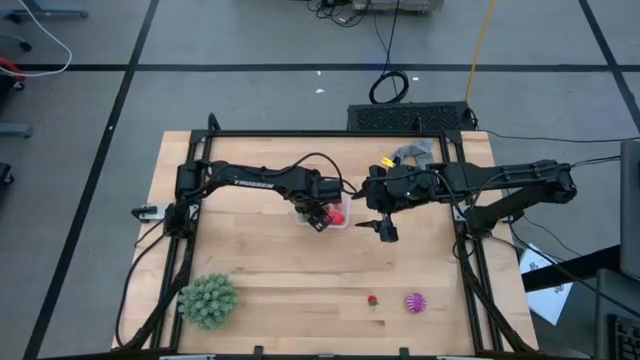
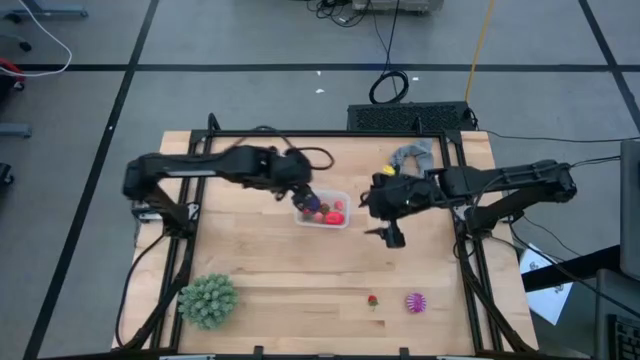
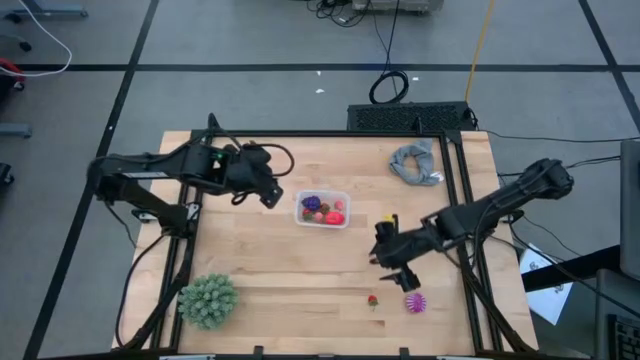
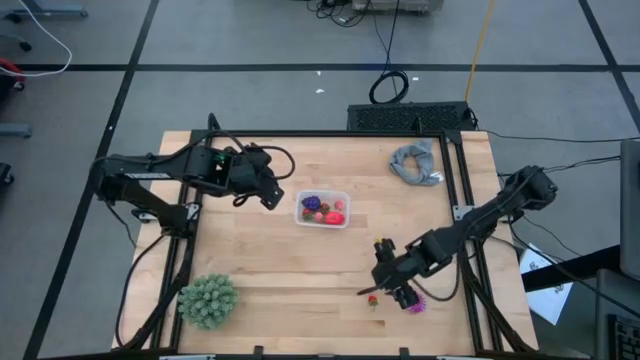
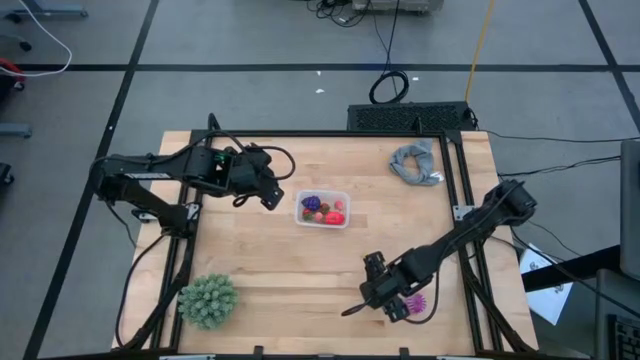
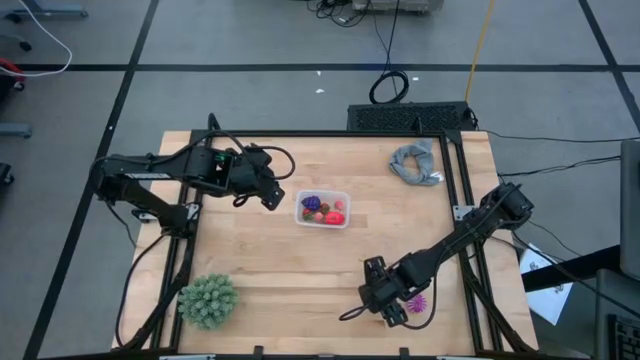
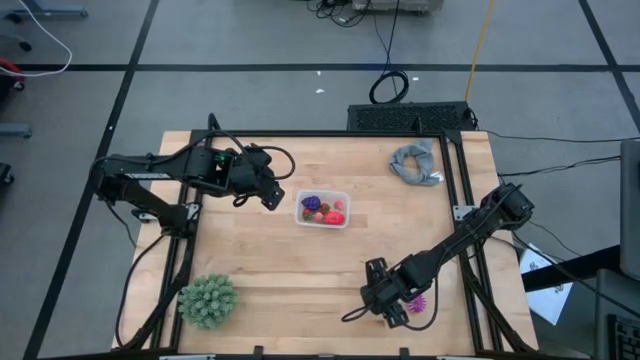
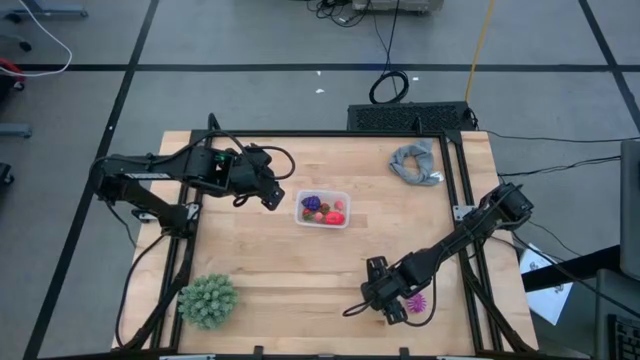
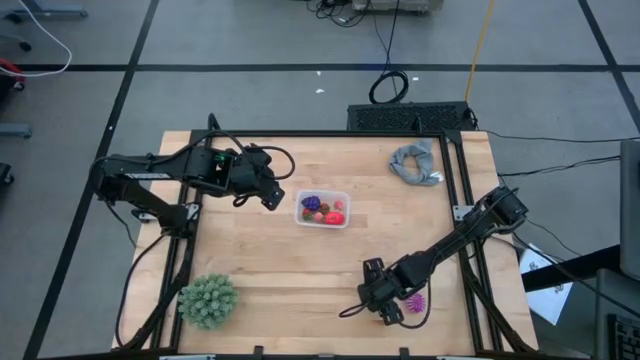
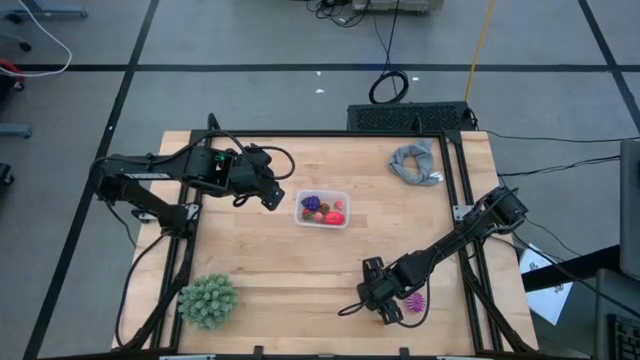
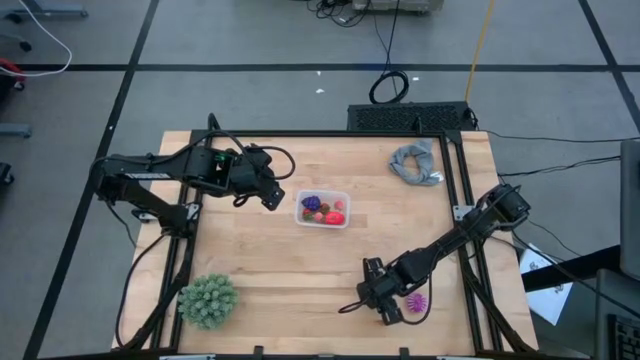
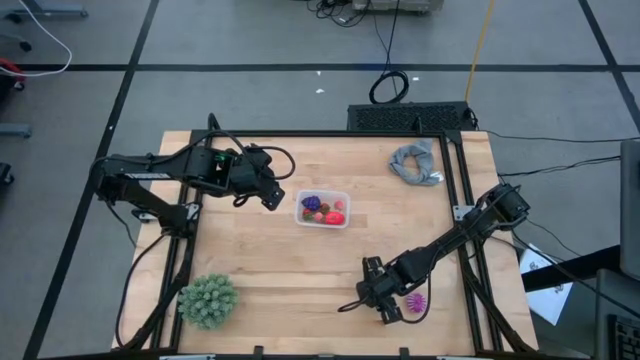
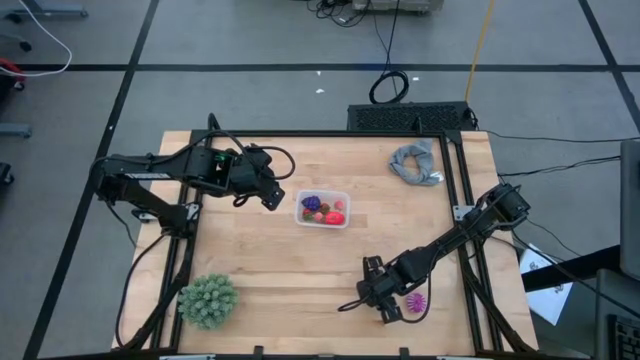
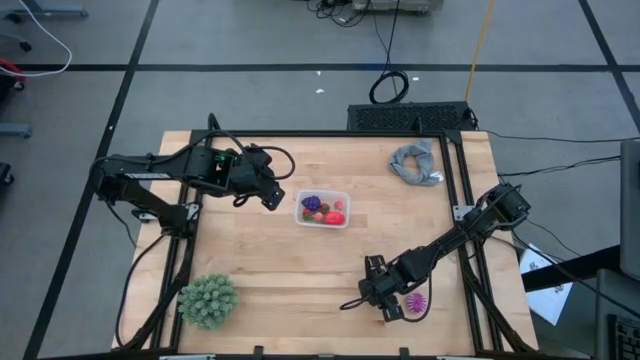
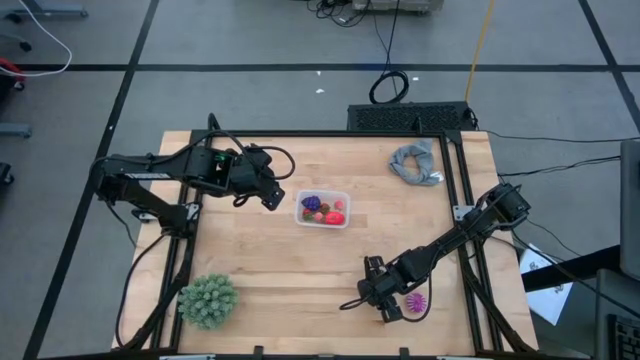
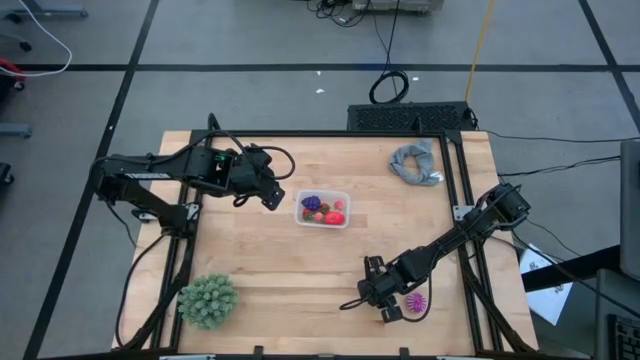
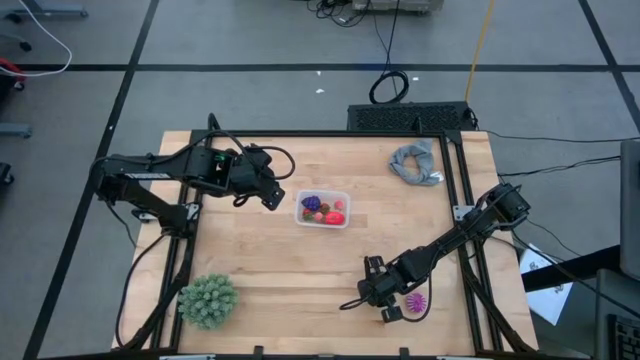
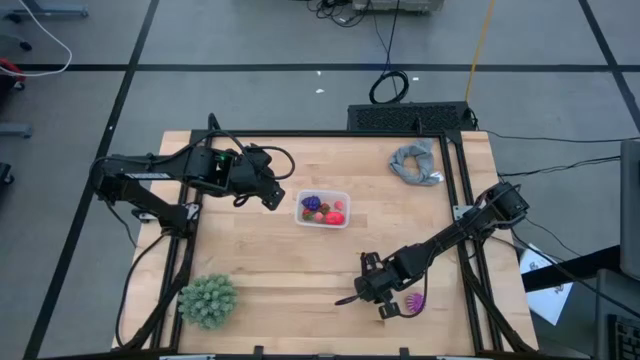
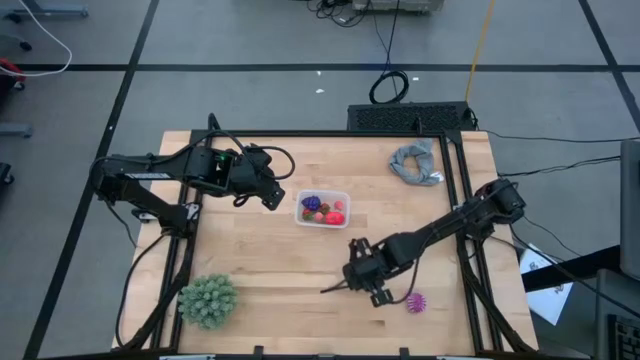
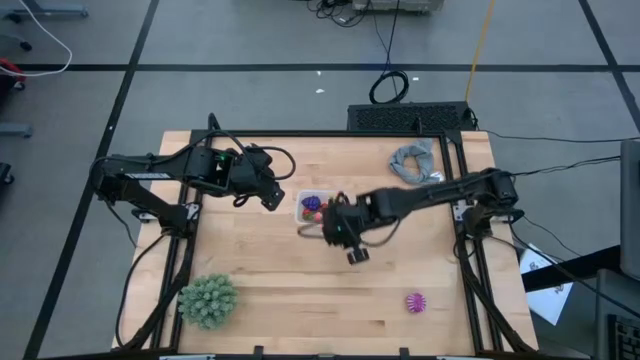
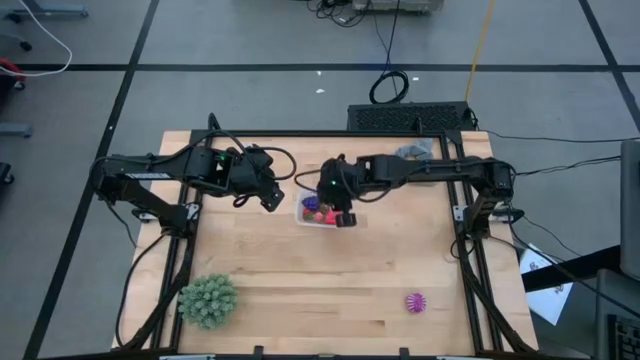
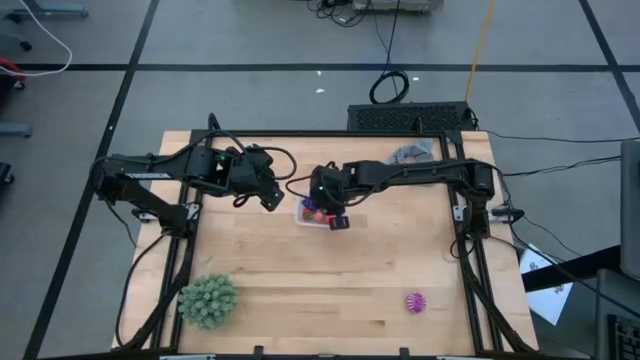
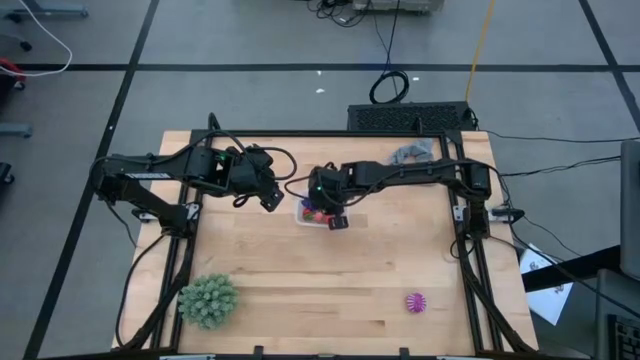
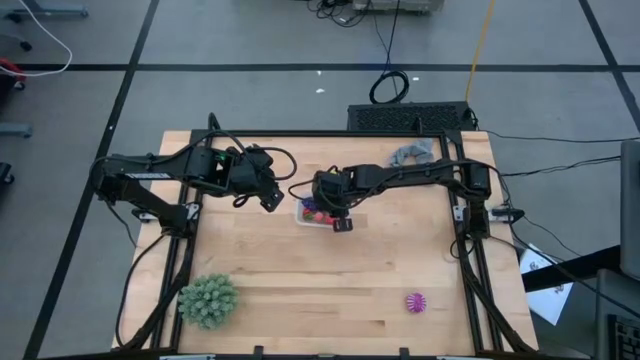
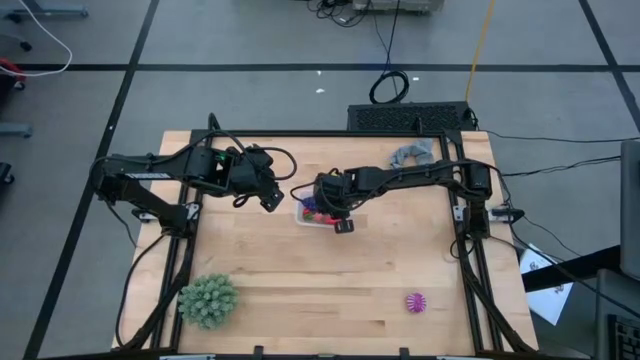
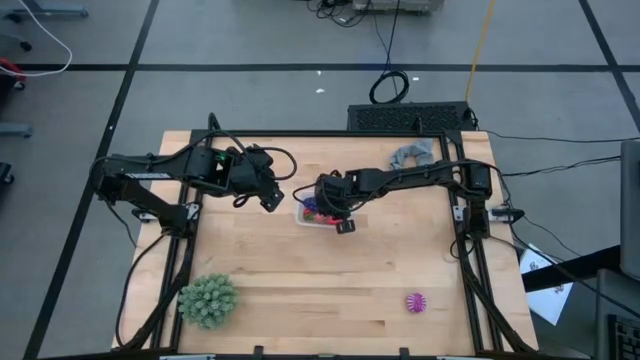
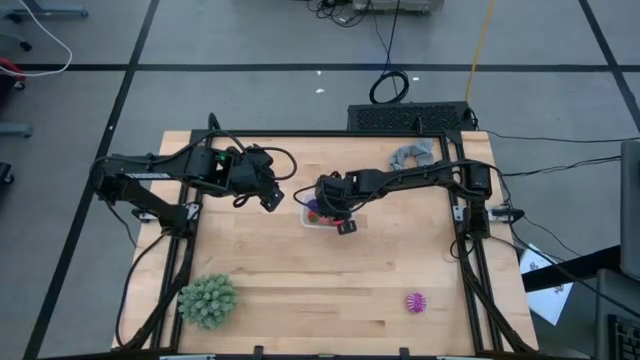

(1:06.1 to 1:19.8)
Task: Pick and placing Produce into tupperware
Put the strawberry into the transparent bin

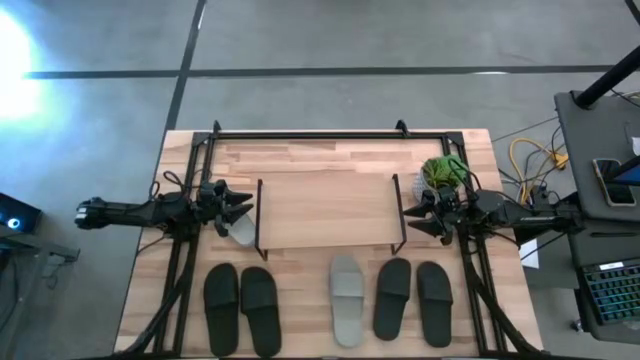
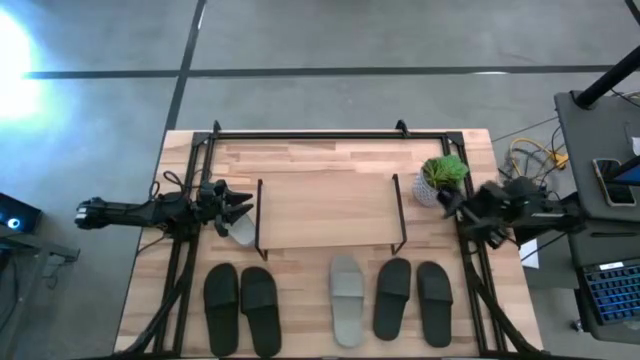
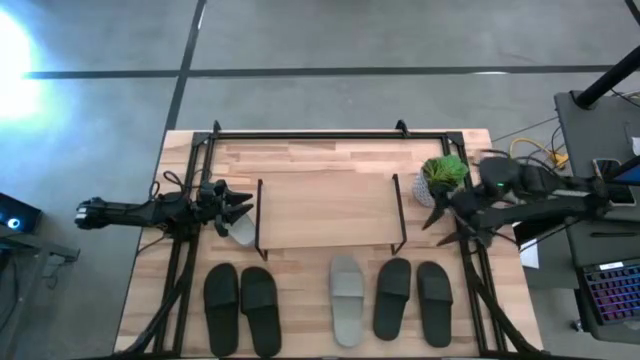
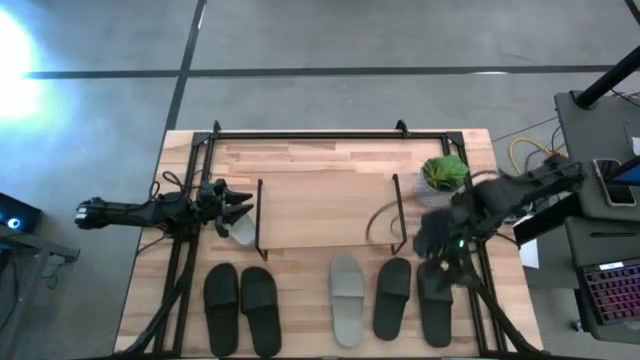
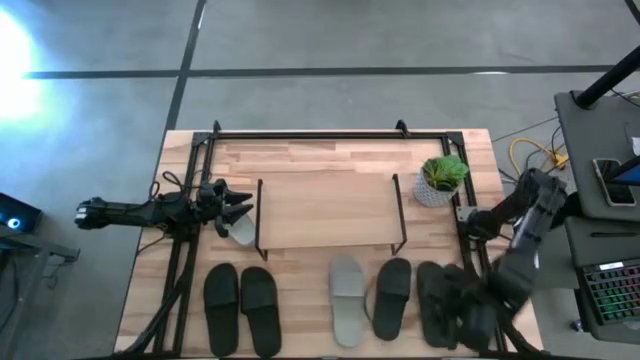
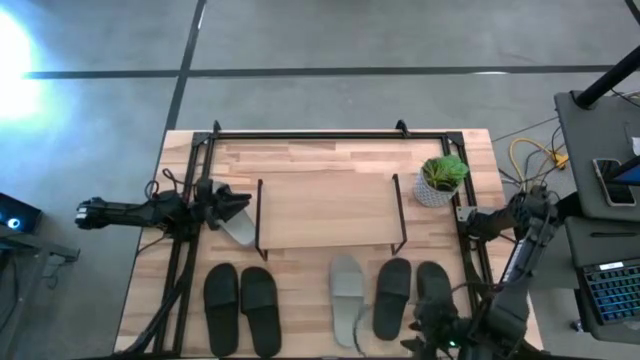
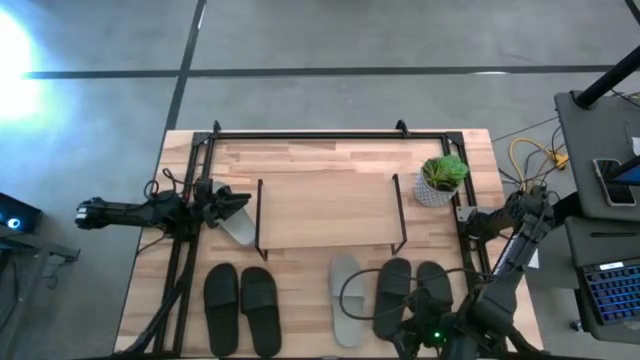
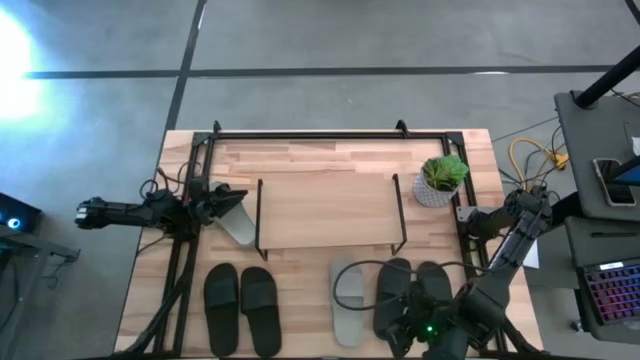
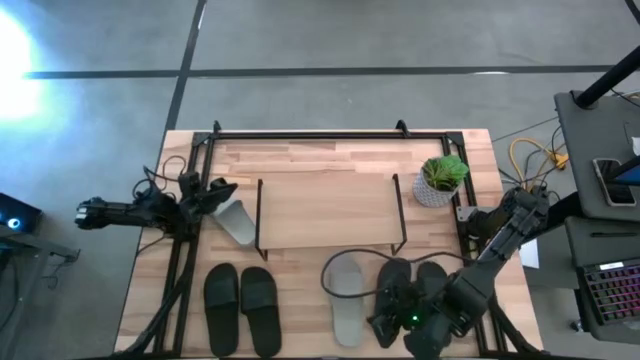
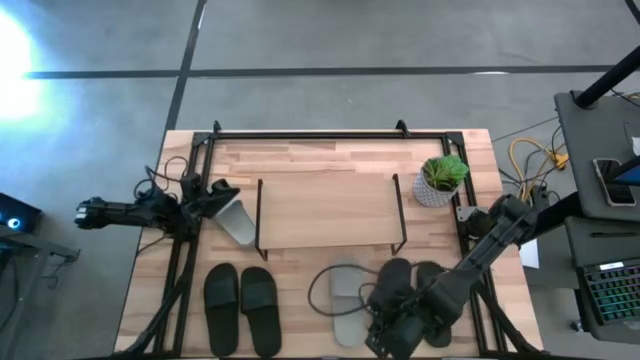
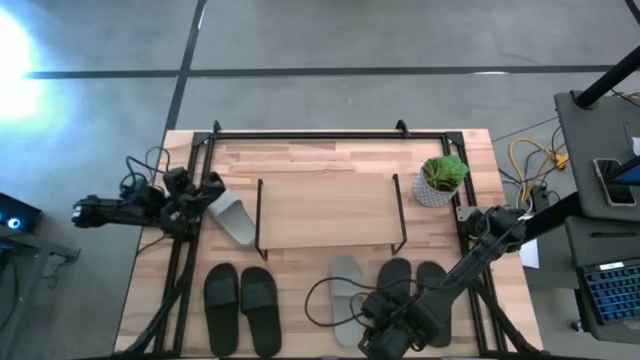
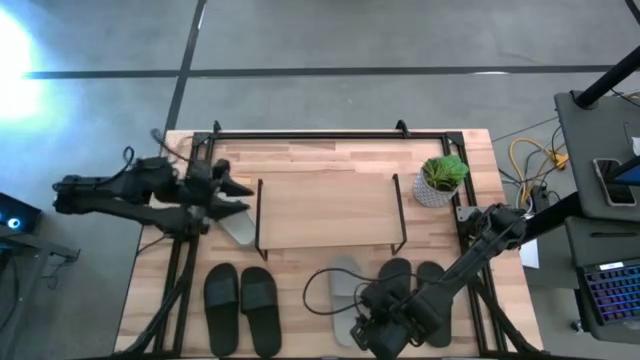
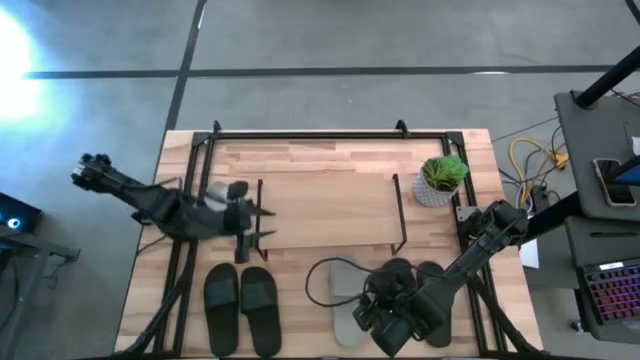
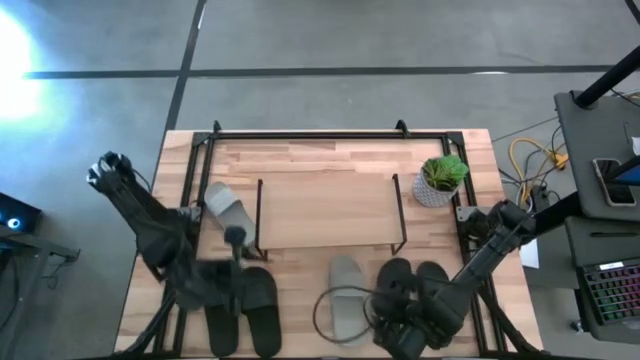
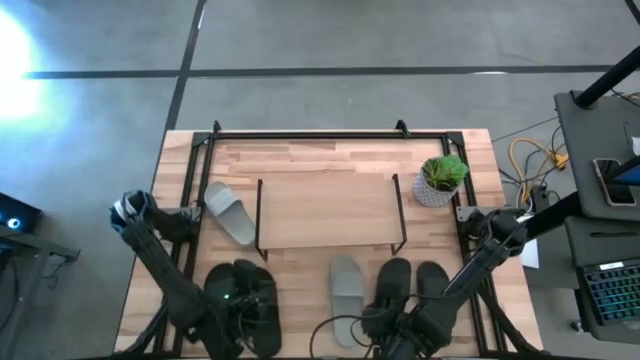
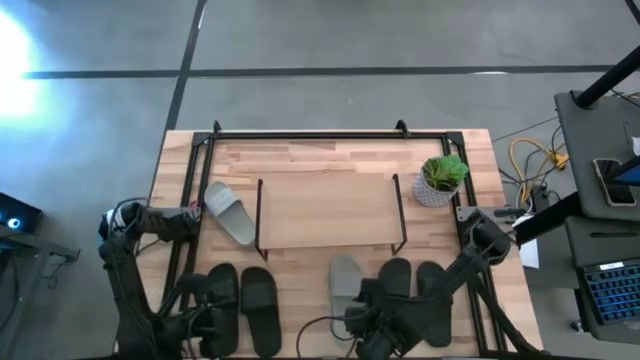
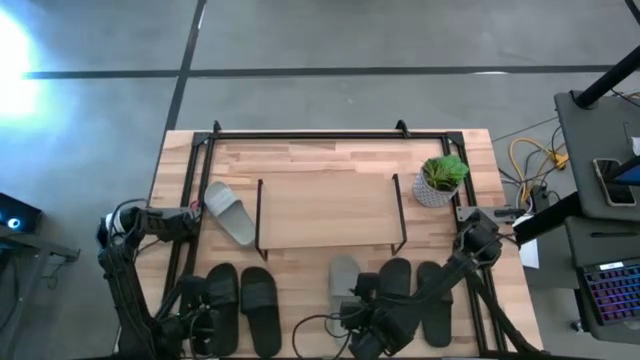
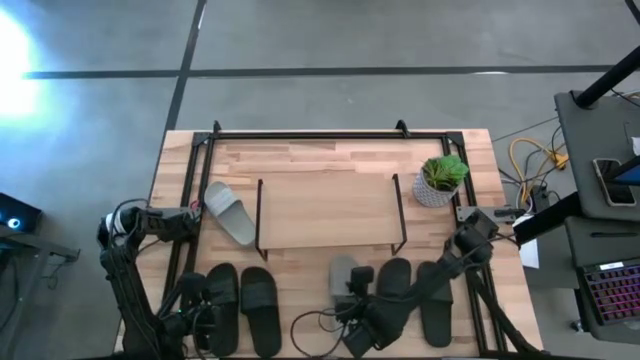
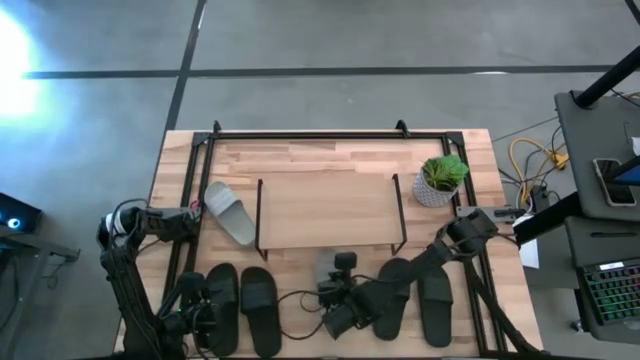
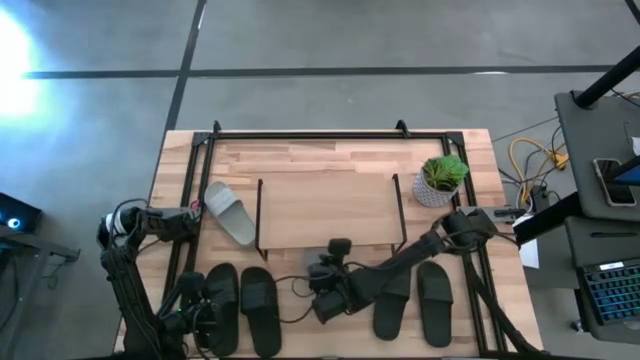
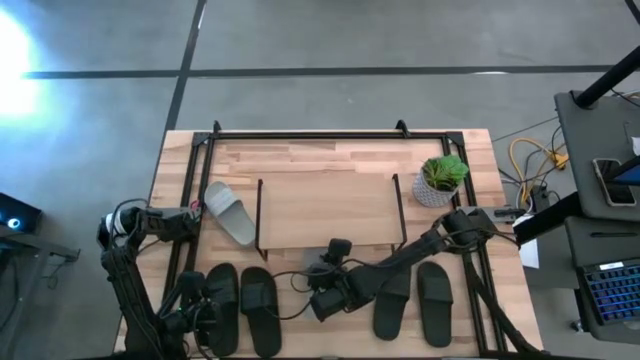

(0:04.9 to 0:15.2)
Task: Pick and place slides into the shelf
Move the bottom gray slide under the shelf
